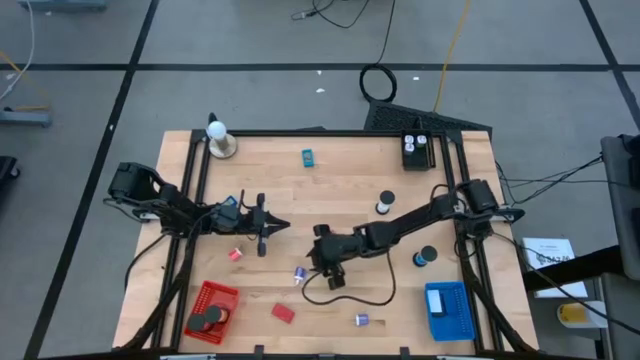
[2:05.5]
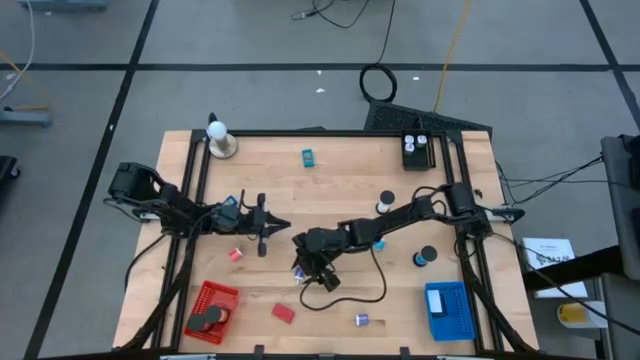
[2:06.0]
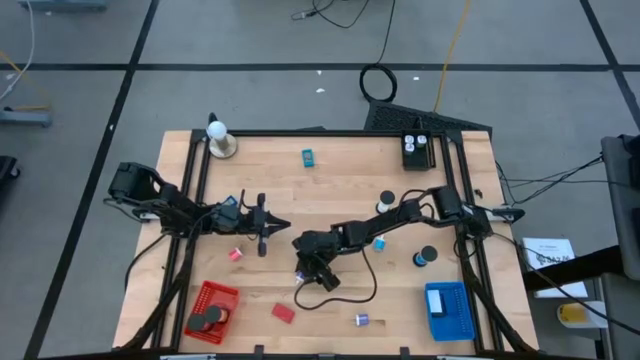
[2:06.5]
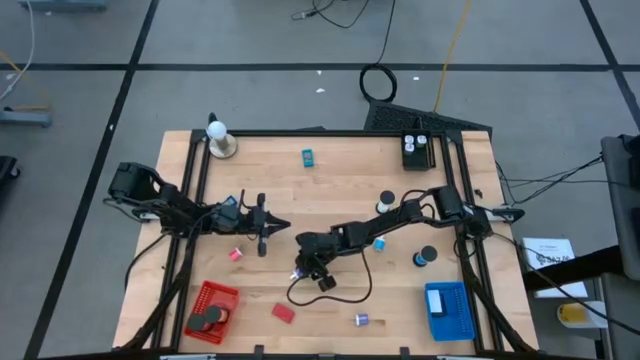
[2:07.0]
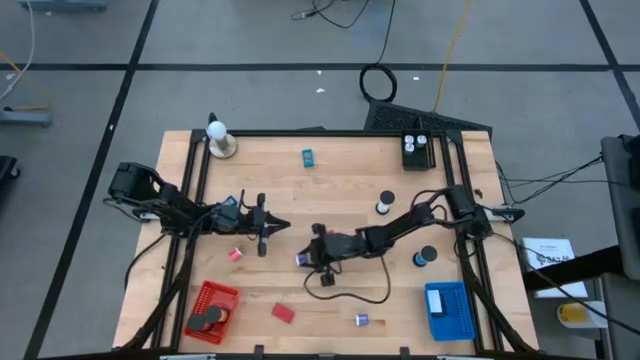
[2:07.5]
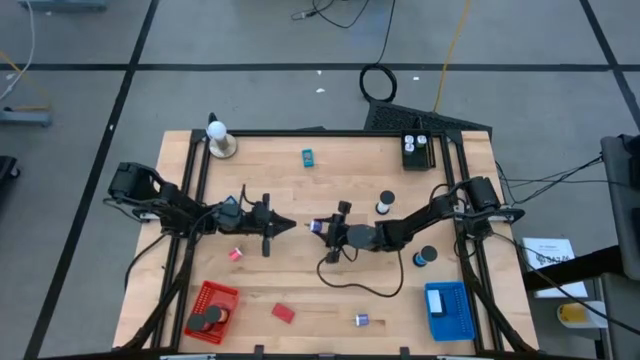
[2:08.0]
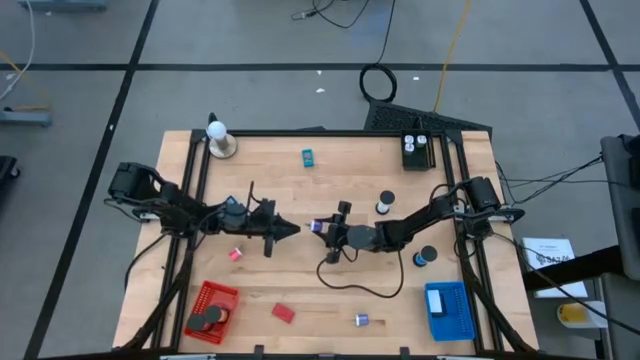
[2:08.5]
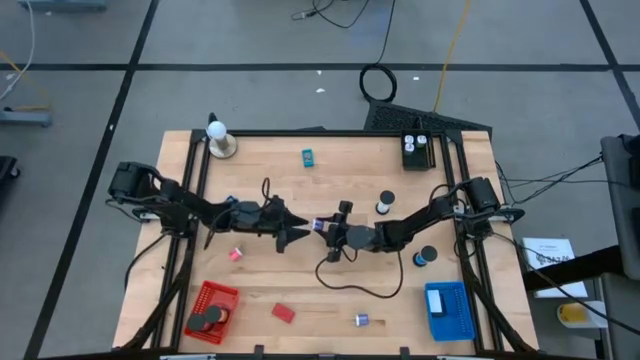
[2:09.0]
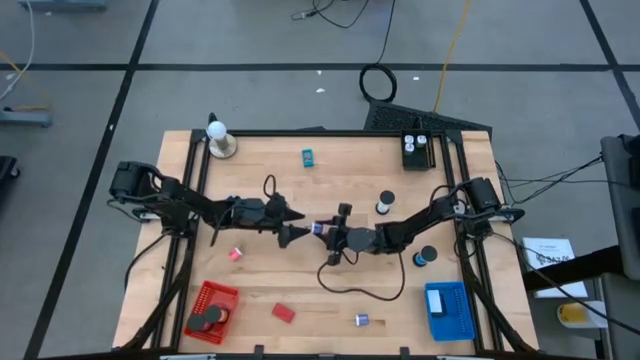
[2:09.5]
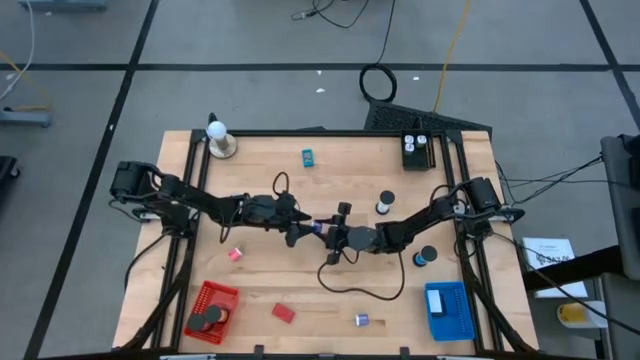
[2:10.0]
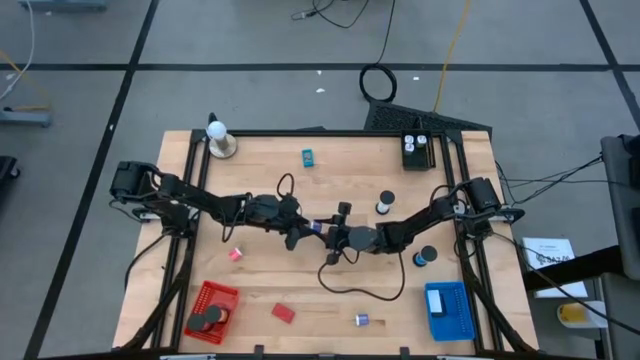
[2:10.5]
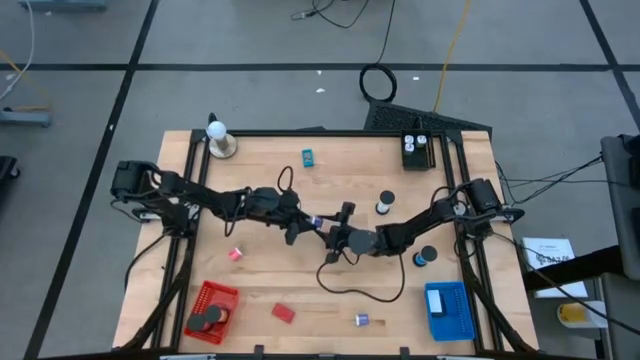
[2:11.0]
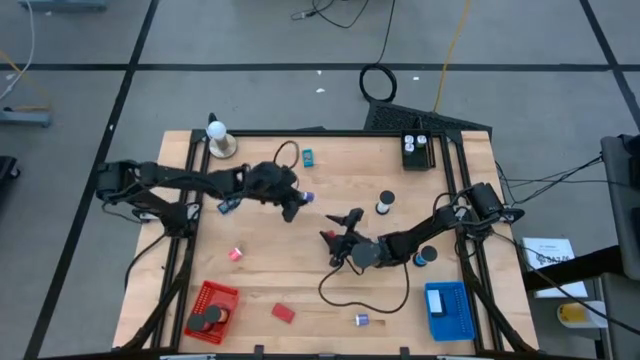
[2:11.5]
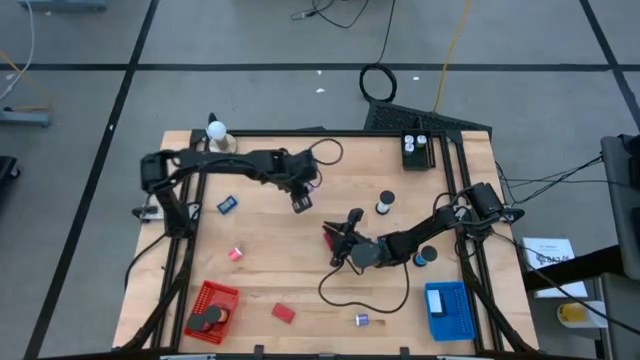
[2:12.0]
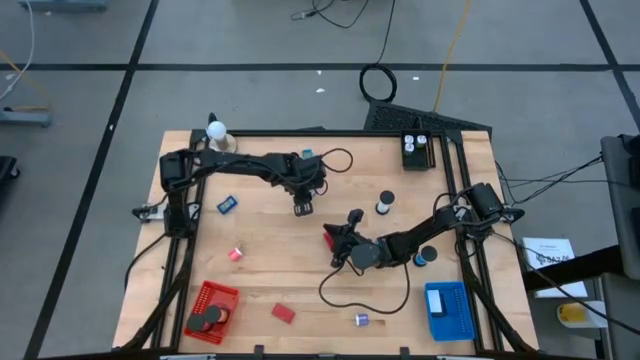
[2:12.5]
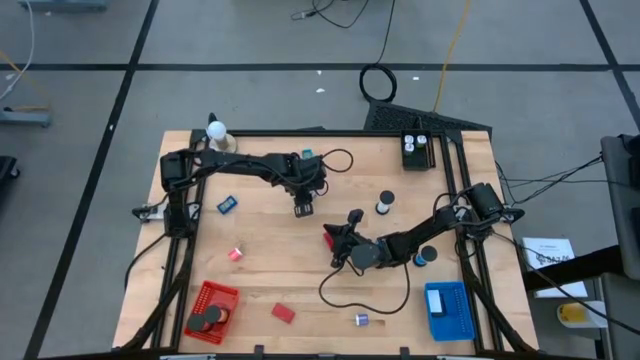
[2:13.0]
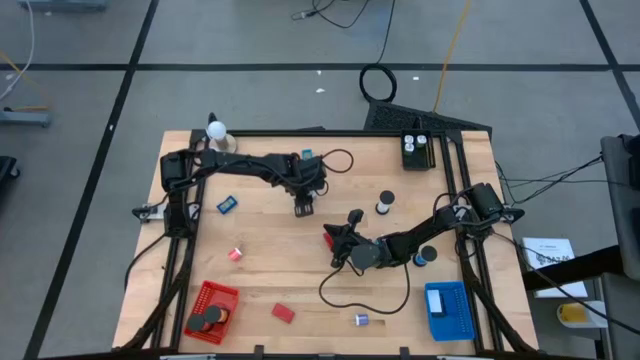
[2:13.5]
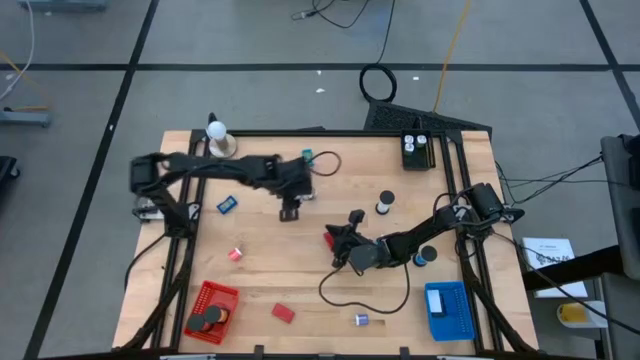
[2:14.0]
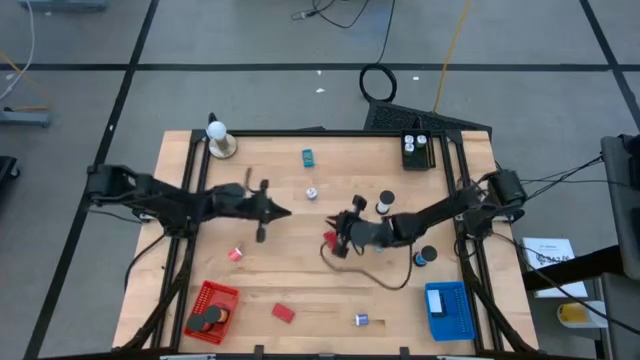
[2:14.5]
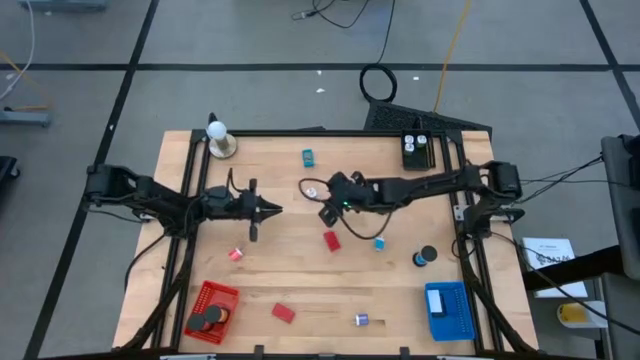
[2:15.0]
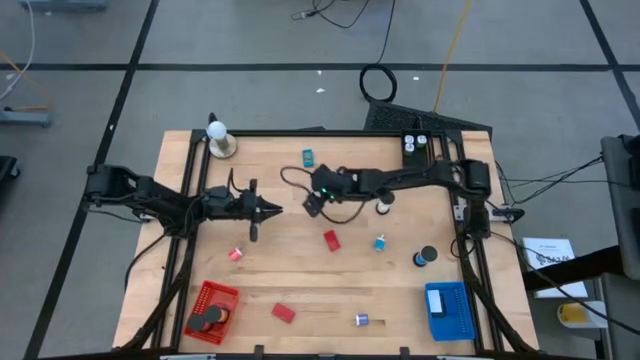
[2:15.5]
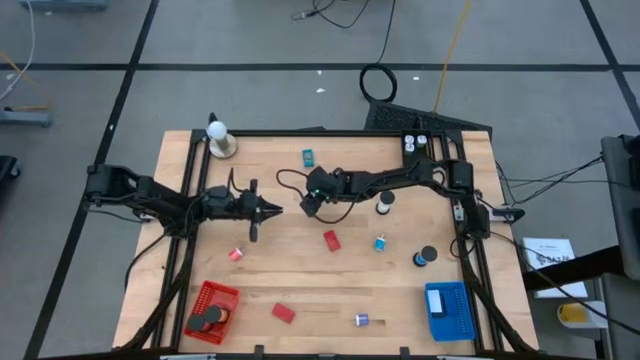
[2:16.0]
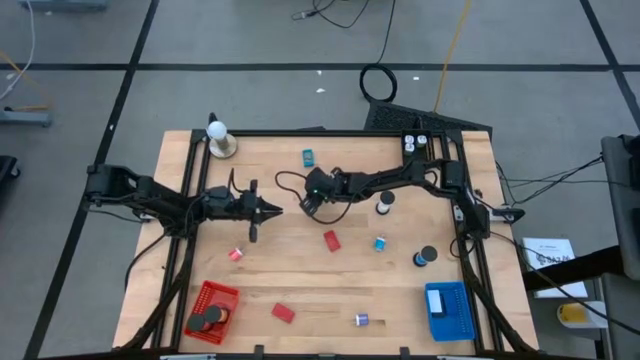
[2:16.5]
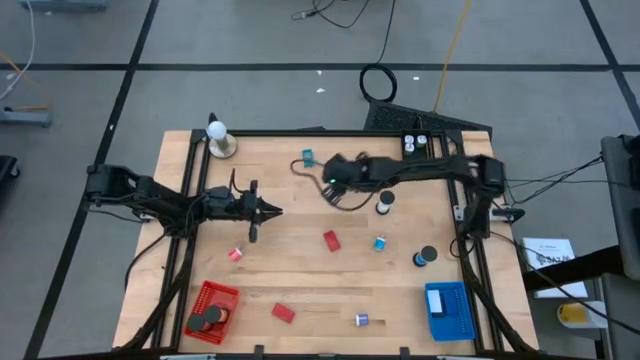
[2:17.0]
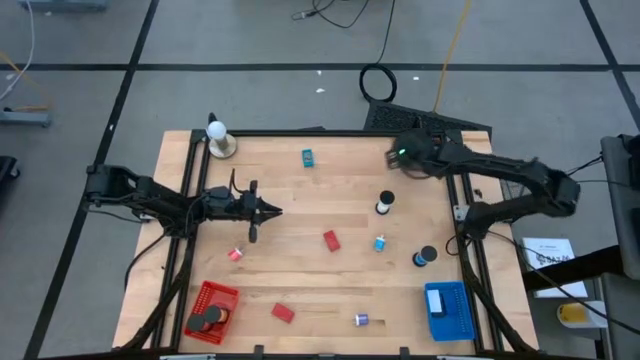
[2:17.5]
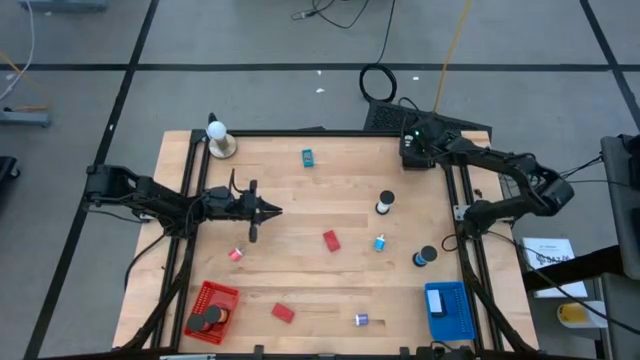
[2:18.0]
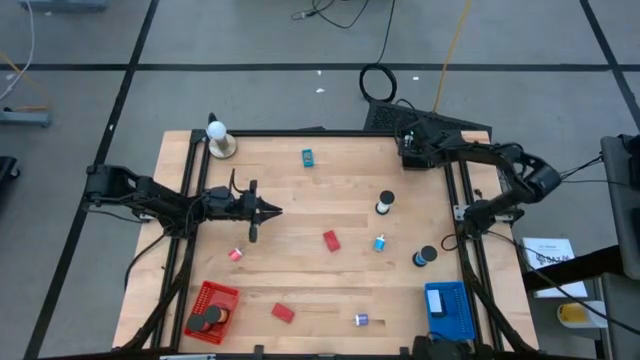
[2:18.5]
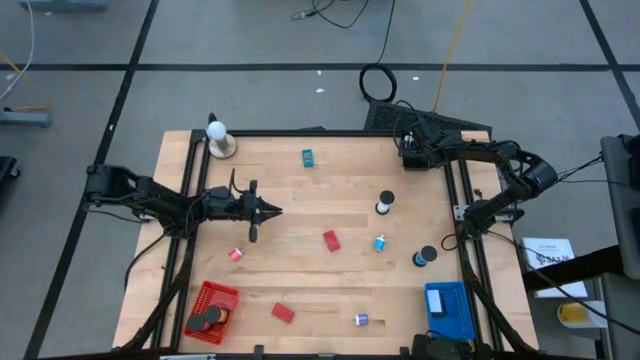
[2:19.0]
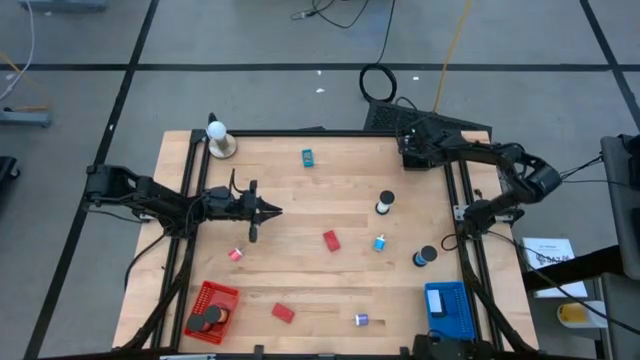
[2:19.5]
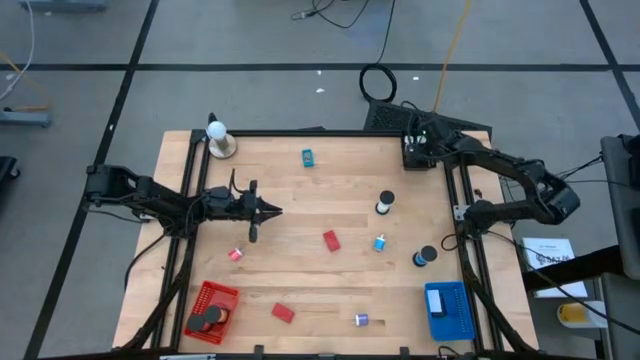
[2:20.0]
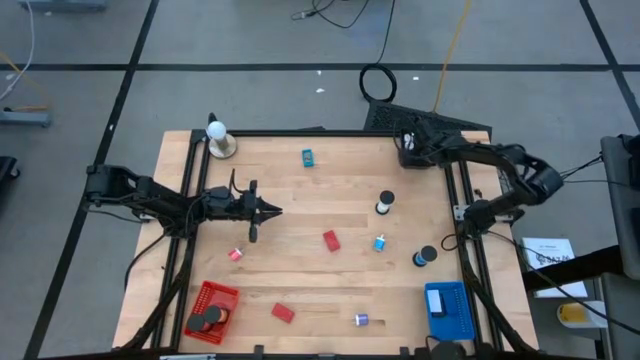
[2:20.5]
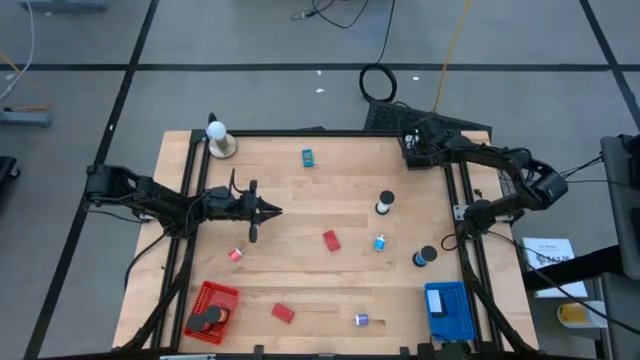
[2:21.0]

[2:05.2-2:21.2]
Task: Pick & Place Office items
Put the violet charger adapter into the black bin

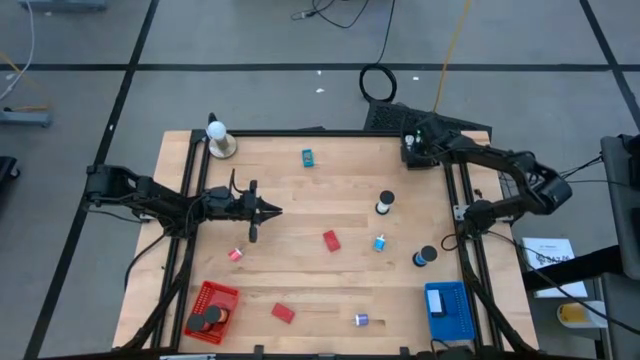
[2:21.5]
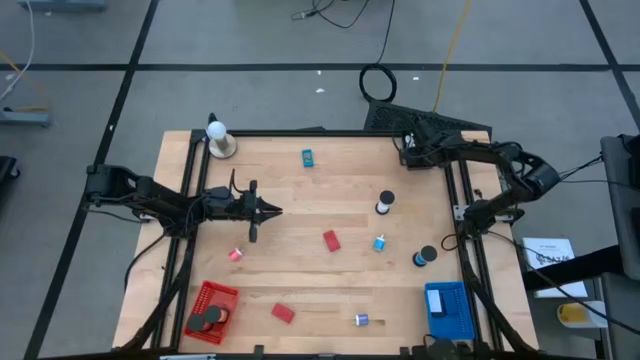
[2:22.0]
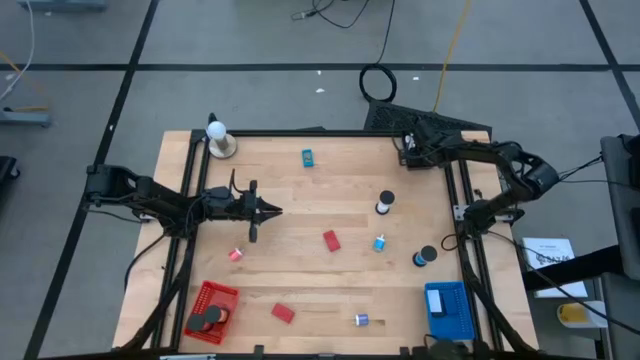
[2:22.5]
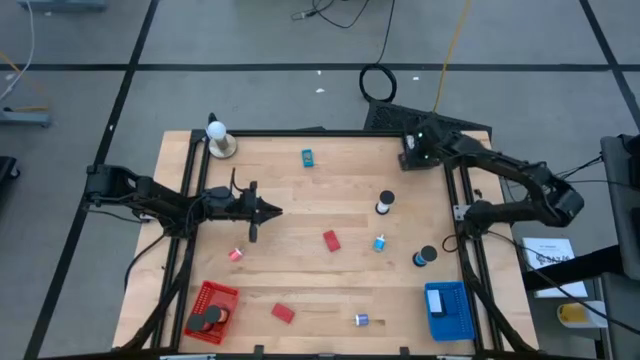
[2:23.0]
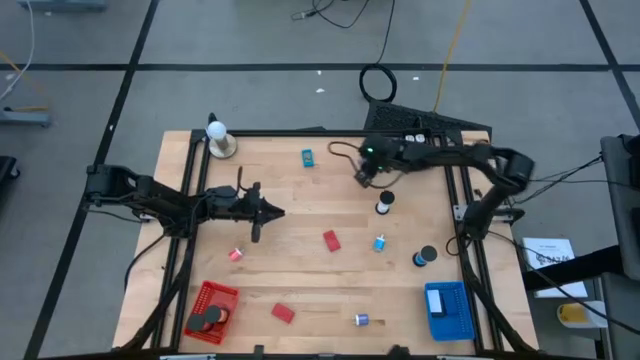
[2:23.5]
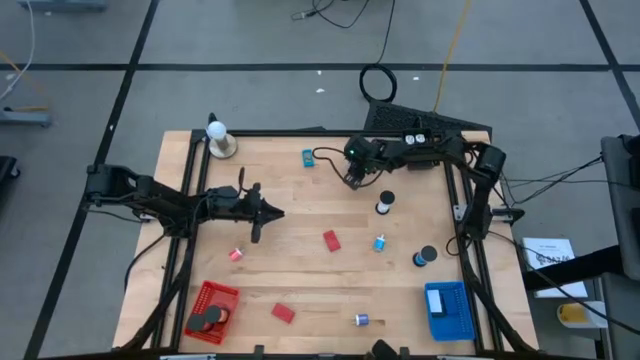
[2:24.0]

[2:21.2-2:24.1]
Remove the violet charger adapter from the black bin

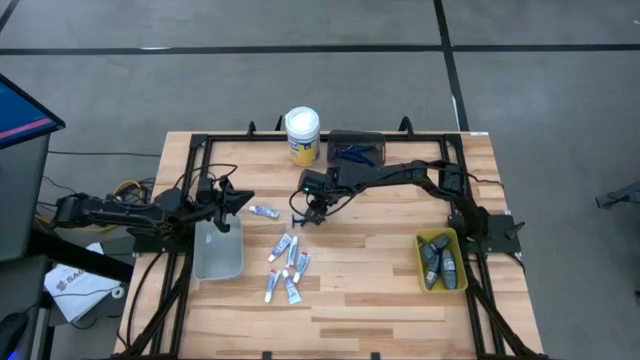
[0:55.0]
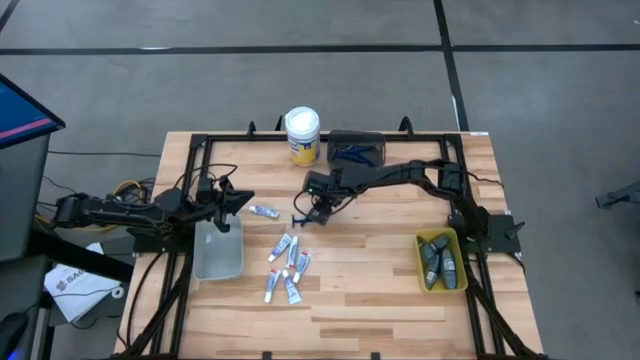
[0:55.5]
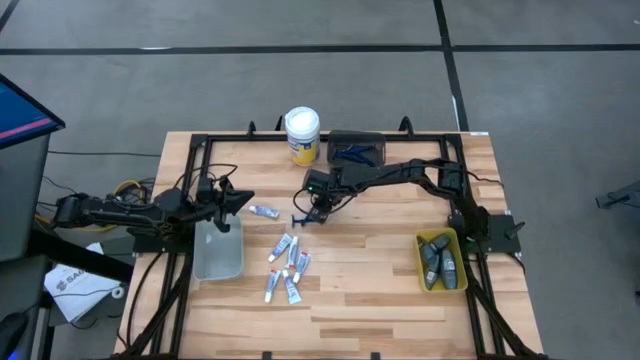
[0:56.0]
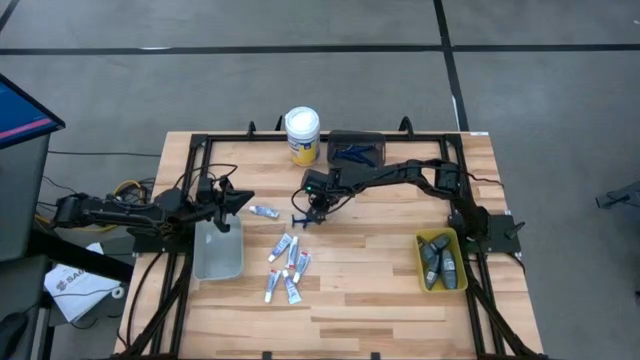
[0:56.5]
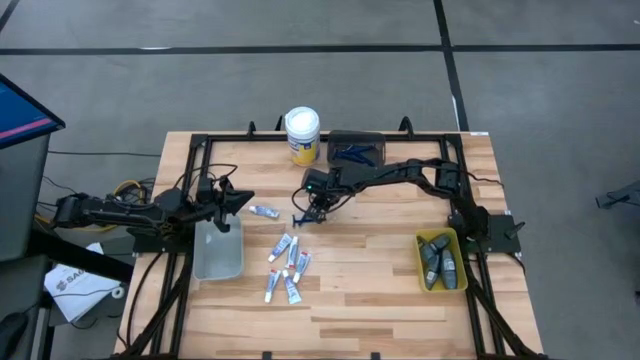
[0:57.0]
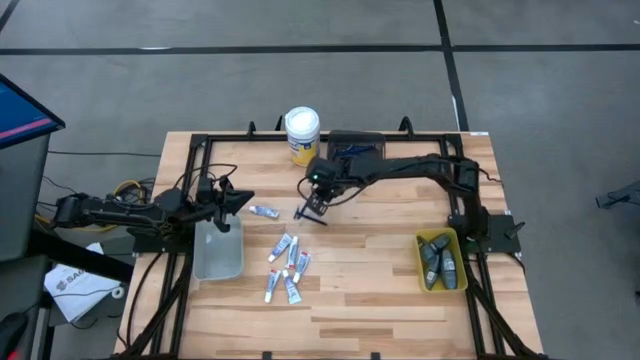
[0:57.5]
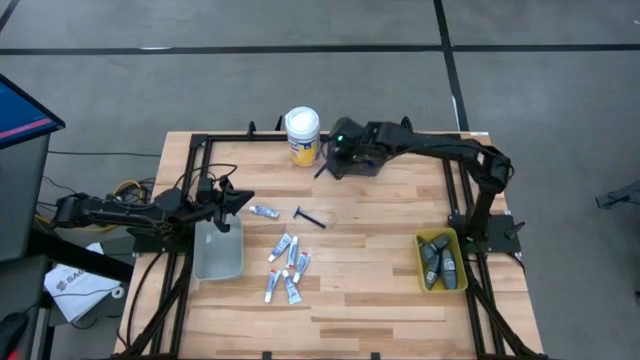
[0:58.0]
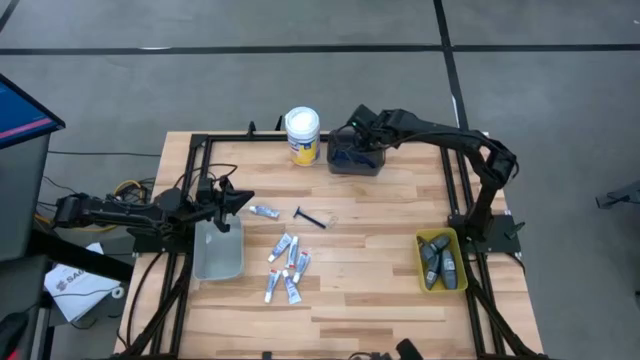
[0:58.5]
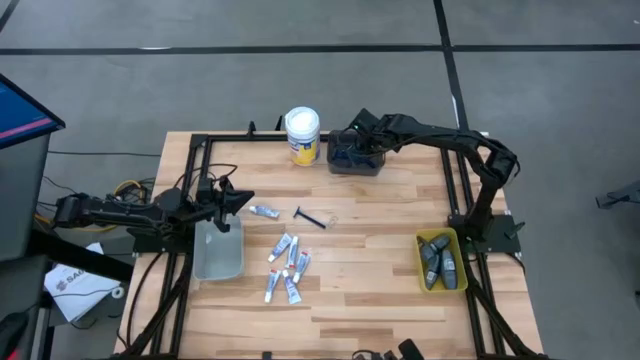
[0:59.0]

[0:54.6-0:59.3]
Task: Pick & Place Travel size toiletries
Put the blue razor into the black bin
